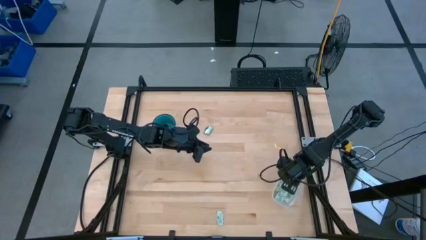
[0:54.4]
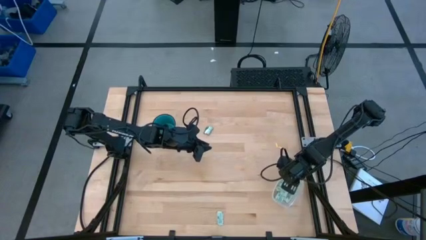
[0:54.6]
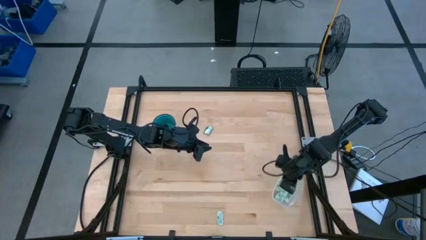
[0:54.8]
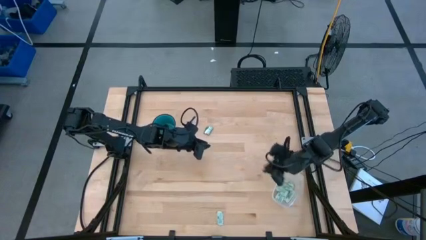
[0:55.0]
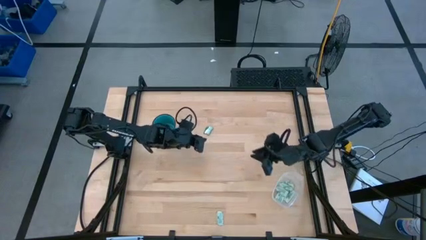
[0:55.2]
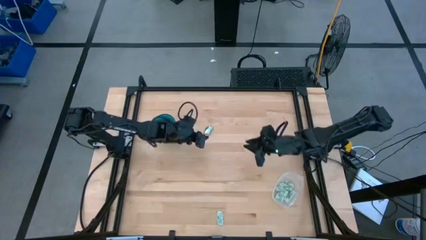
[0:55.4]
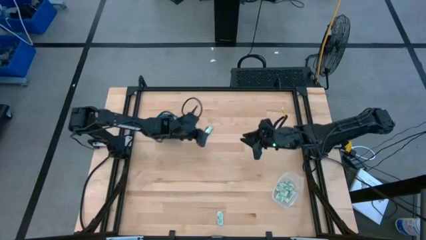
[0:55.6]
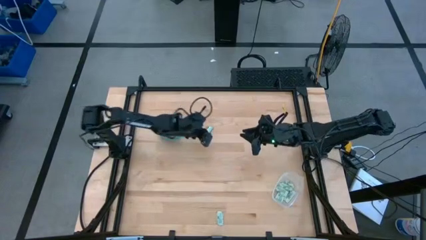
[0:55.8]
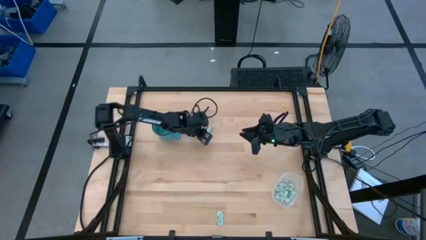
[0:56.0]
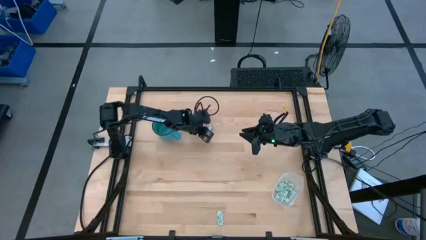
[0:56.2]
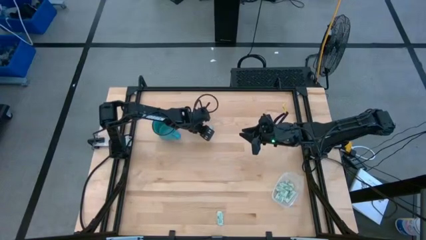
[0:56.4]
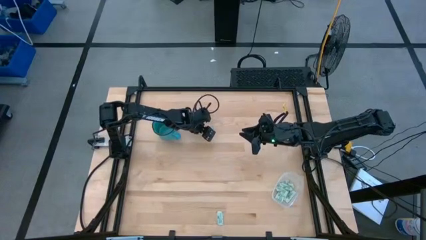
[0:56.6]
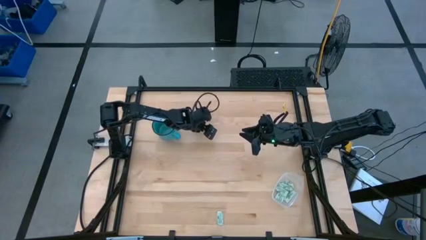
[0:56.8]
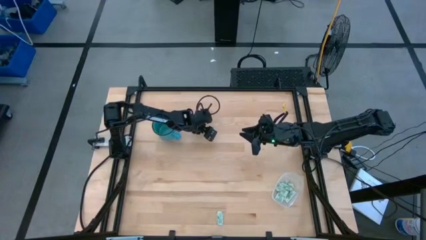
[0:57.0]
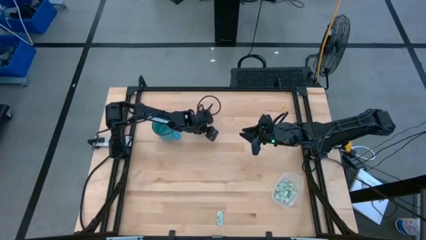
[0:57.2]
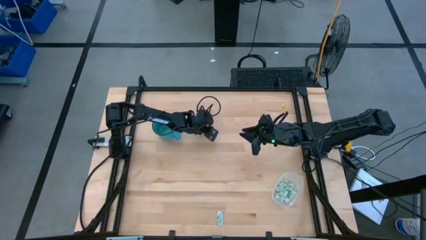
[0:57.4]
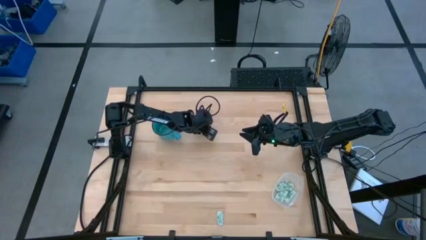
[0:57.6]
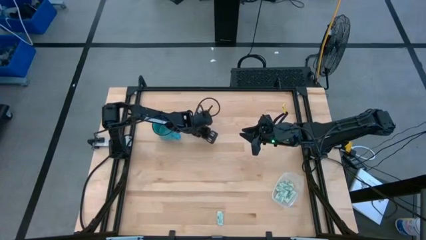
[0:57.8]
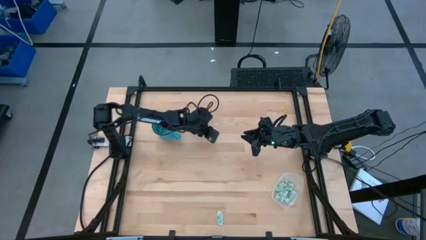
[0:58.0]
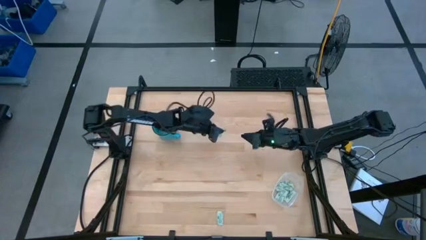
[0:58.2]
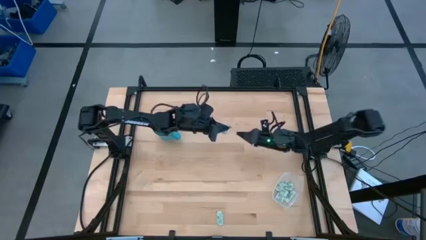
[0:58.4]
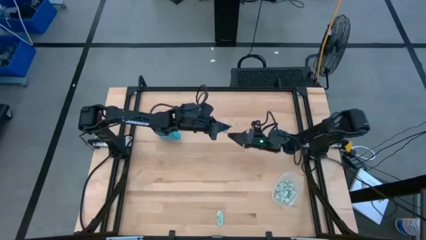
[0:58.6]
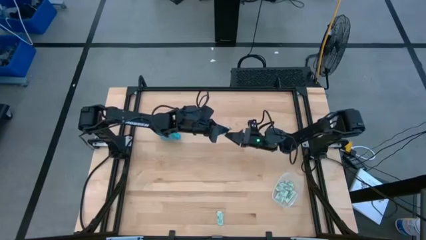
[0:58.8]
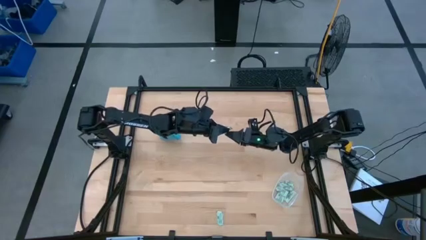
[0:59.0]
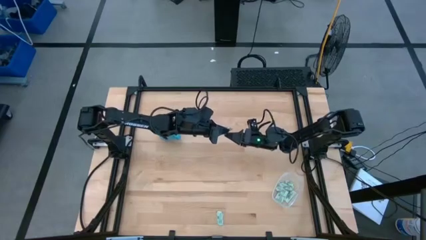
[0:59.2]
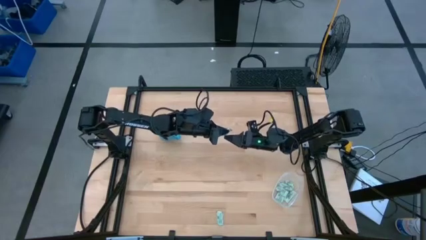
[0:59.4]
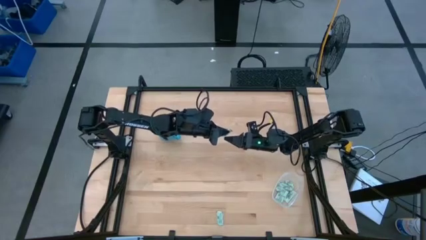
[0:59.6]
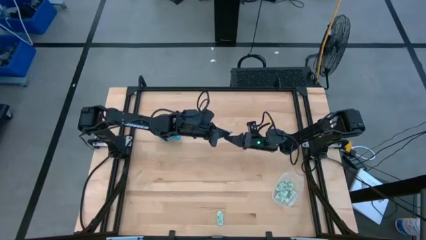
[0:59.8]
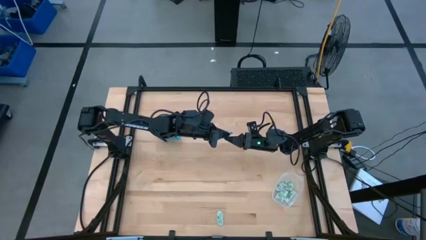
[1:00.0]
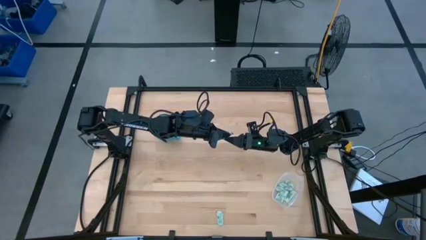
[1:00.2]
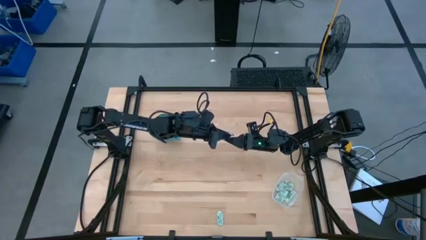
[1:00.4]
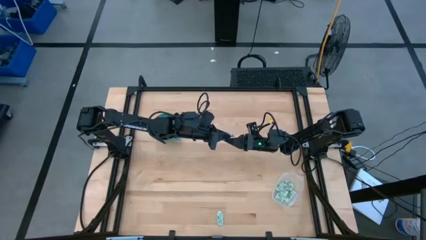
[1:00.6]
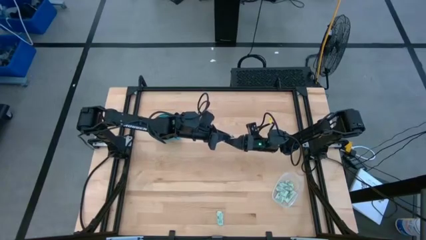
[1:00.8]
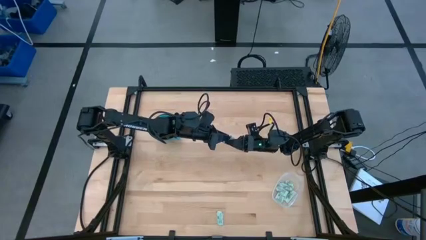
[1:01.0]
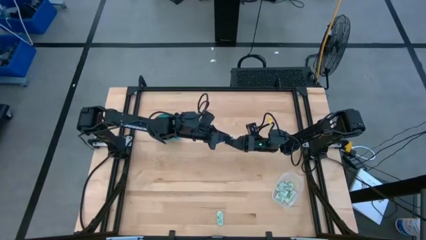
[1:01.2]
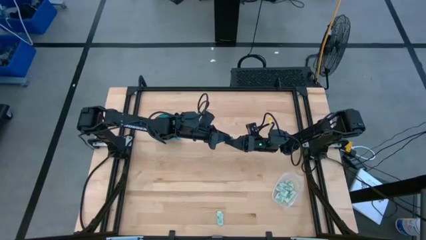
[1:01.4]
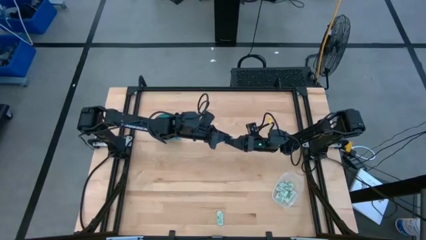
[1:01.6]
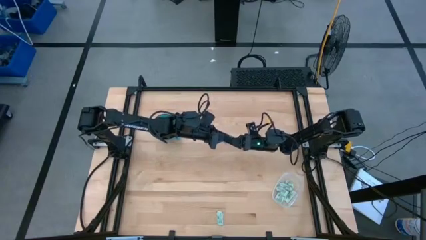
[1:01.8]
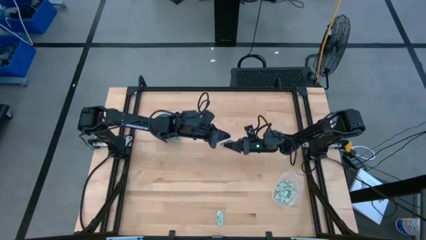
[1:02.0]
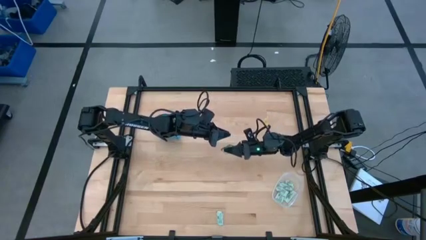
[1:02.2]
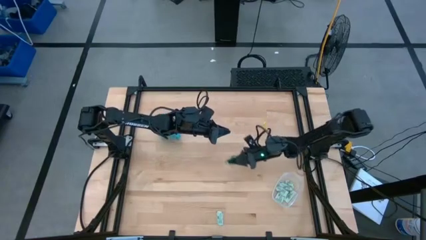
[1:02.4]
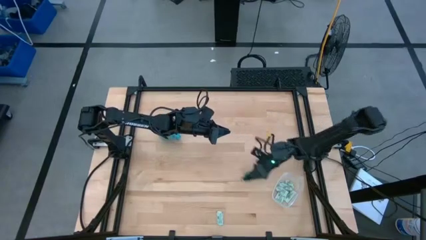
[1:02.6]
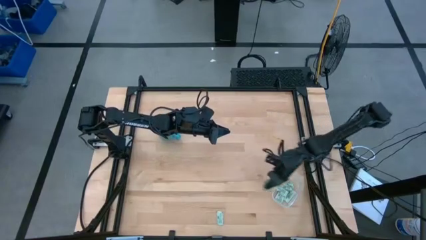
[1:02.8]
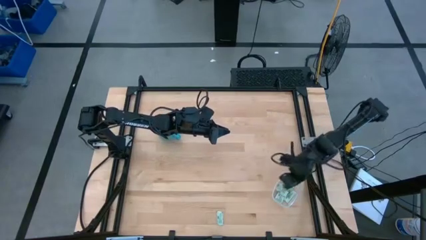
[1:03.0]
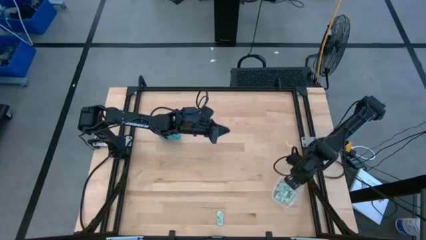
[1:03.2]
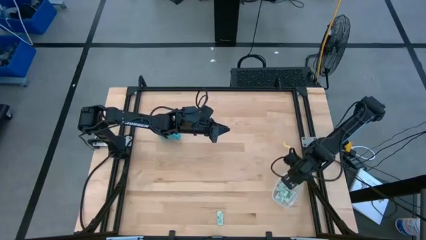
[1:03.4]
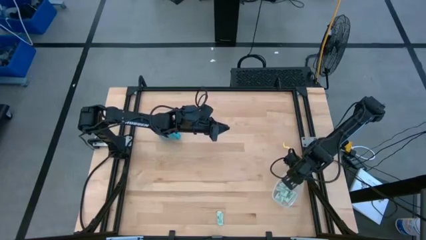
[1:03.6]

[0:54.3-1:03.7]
Task: Pick and place Stevia / Truvia into bins
Put the truvia packet into the transparent container

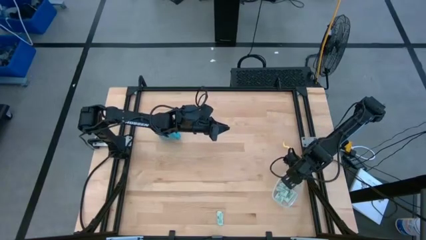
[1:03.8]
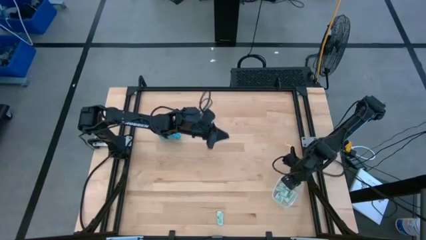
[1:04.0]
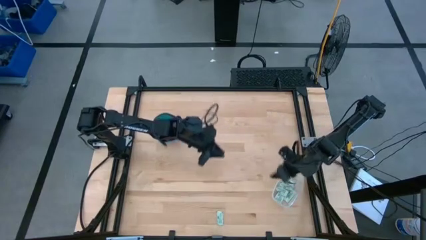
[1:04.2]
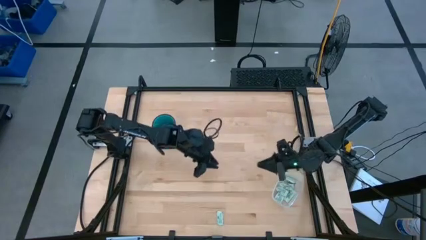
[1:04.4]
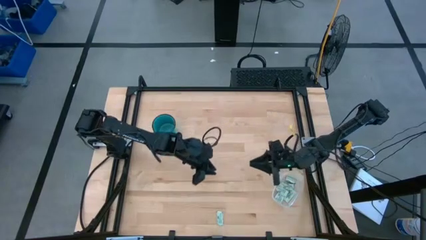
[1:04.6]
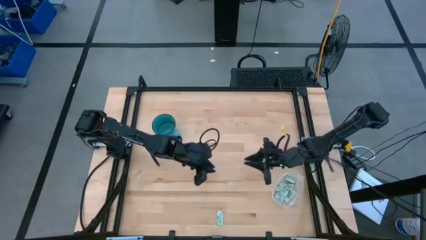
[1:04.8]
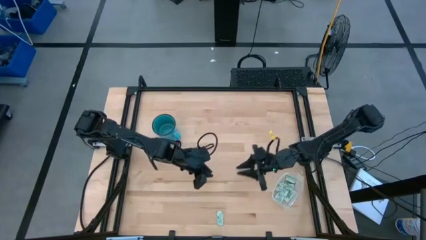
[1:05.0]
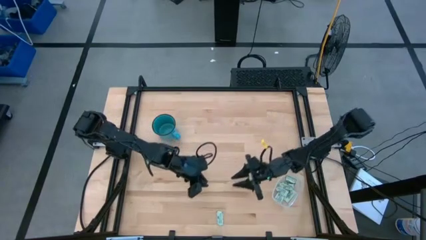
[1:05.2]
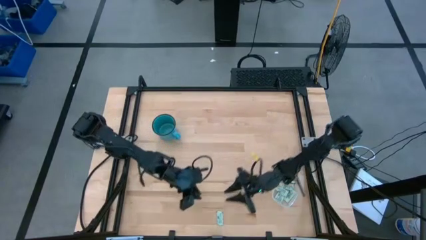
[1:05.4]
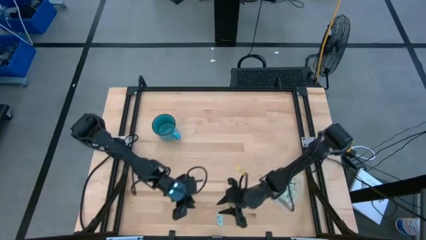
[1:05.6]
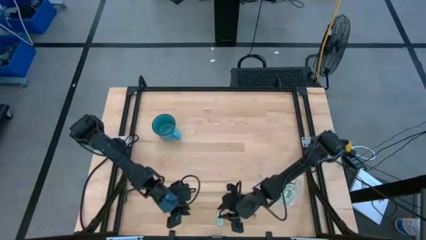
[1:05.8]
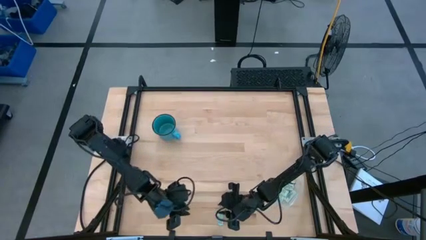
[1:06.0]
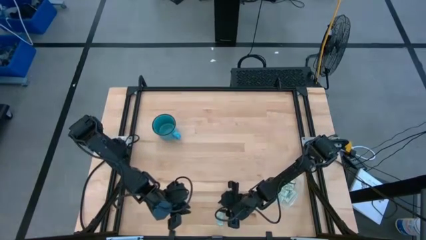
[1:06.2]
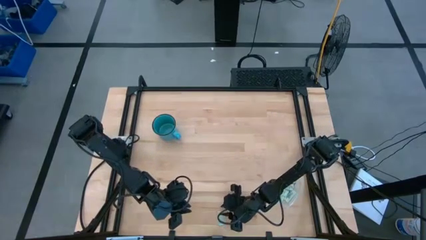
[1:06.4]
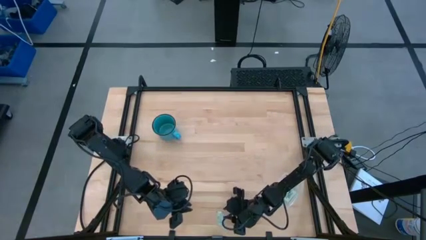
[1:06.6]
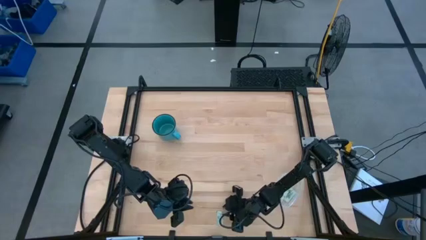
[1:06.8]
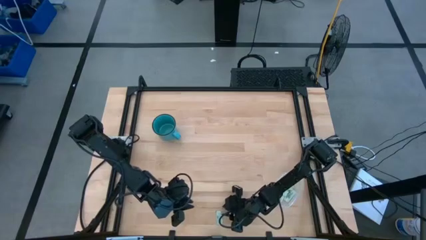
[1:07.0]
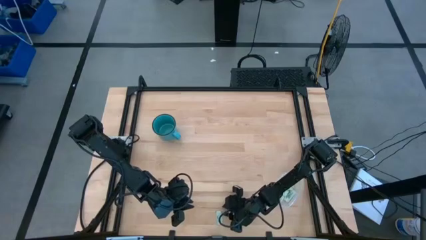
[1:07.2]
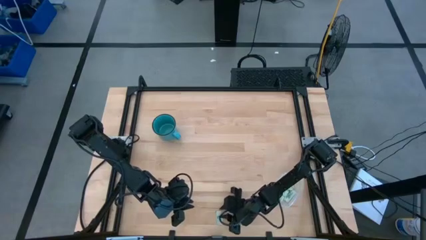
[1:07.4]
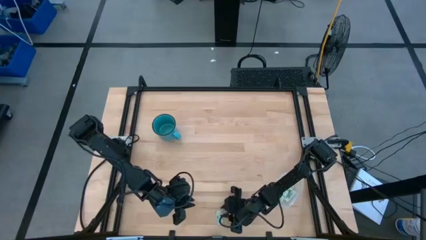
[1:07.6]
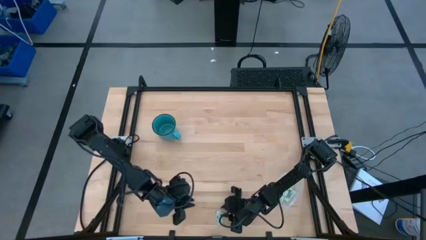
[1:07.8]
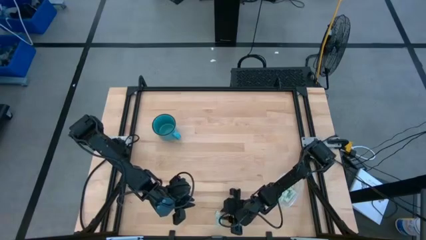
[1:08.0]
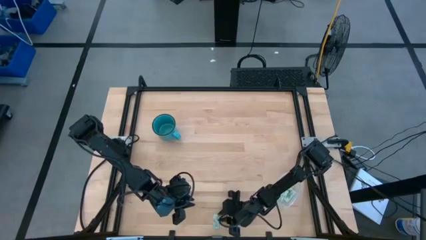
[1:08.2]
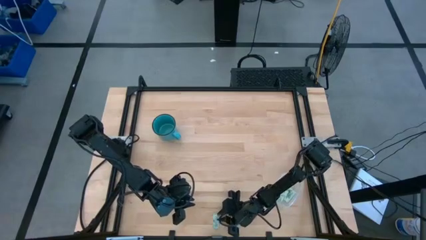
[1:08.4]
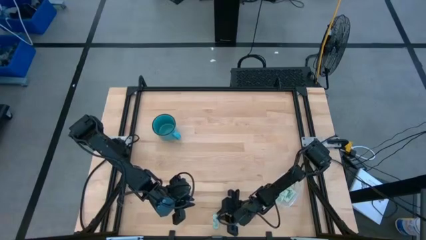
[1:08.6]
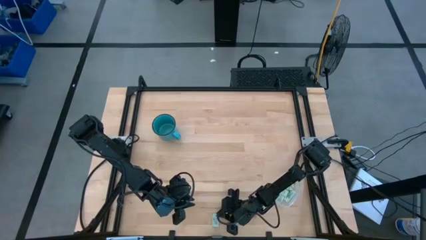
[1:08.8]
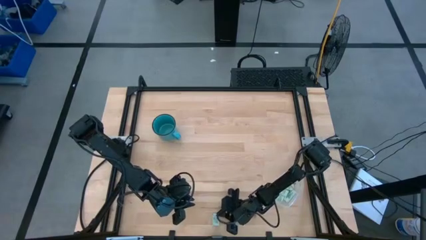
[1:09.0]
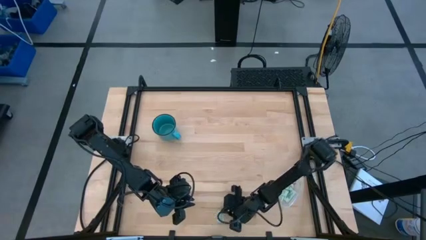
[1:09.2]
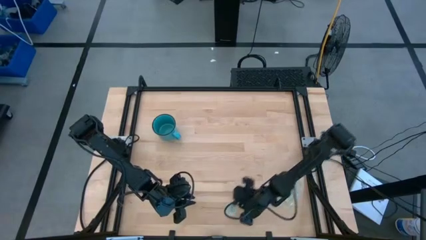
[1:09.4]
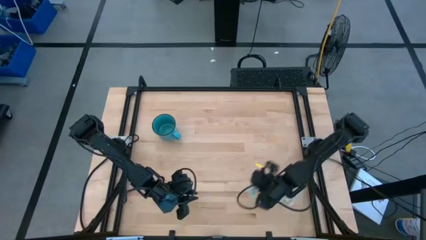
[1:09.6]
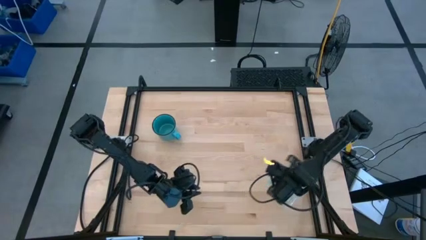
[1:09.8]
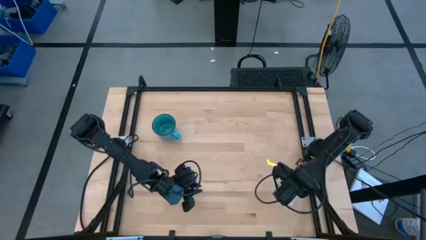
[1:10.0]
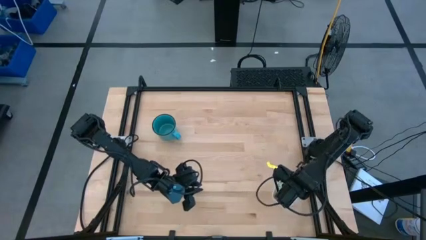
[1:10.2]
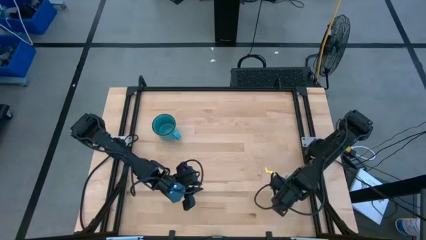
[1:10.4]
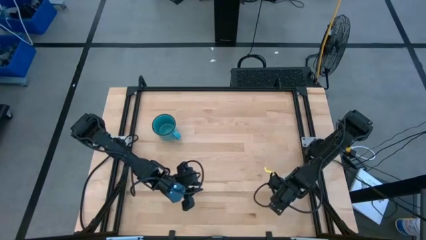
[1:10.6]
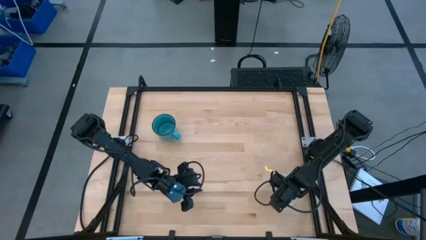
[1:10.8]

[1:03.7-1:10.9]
Put the stevia packet into the transparent container
